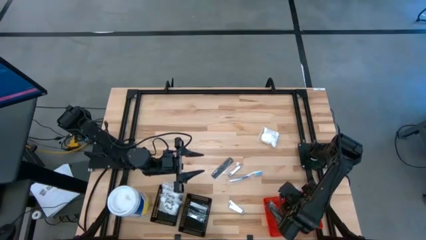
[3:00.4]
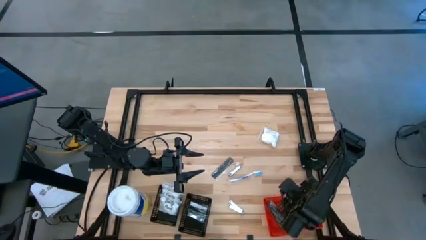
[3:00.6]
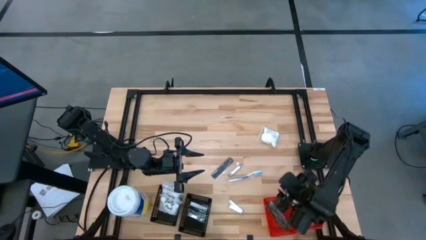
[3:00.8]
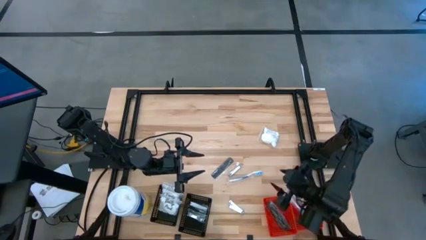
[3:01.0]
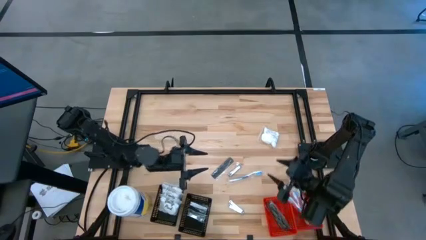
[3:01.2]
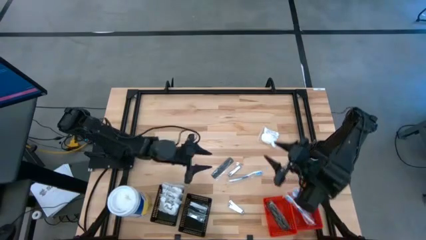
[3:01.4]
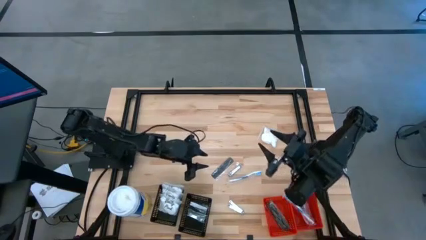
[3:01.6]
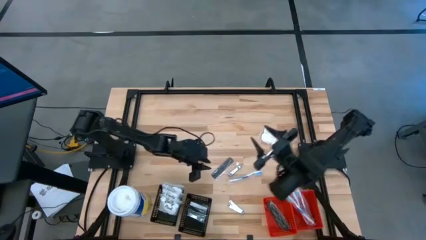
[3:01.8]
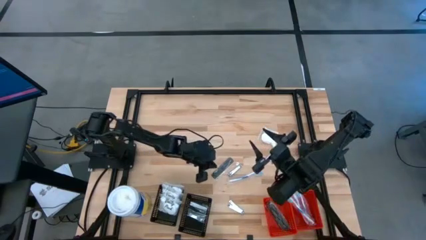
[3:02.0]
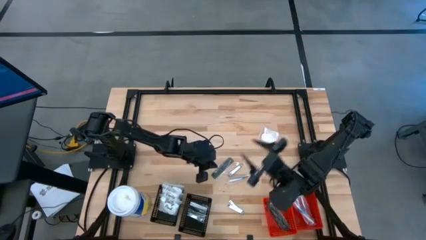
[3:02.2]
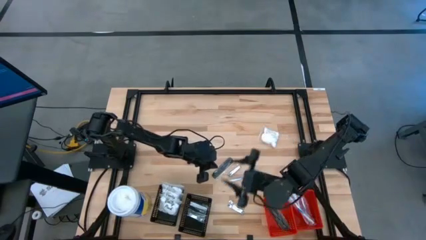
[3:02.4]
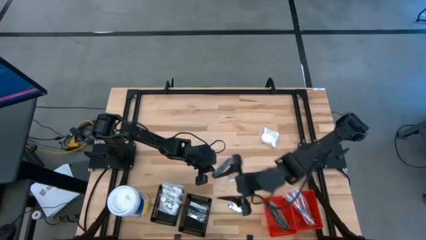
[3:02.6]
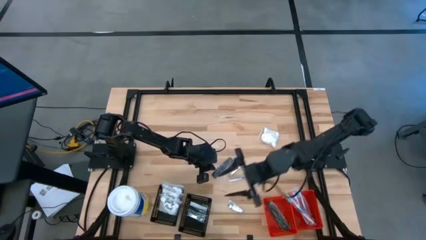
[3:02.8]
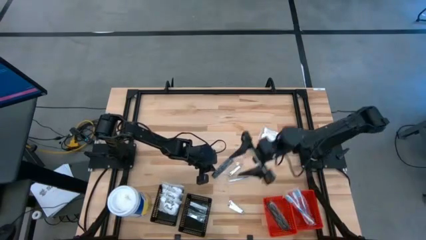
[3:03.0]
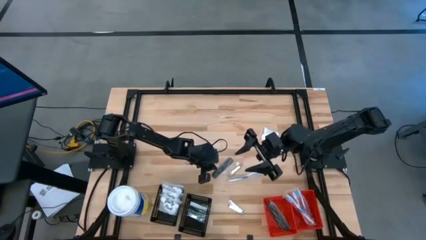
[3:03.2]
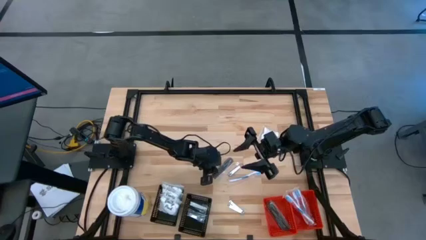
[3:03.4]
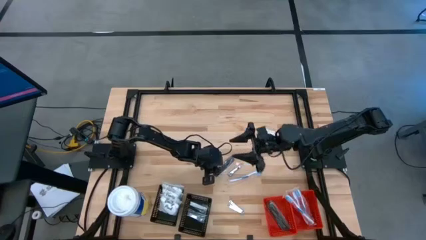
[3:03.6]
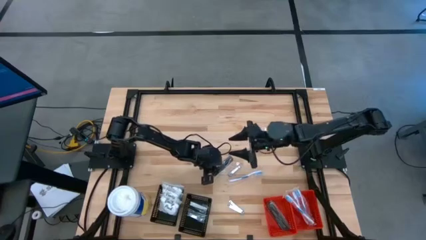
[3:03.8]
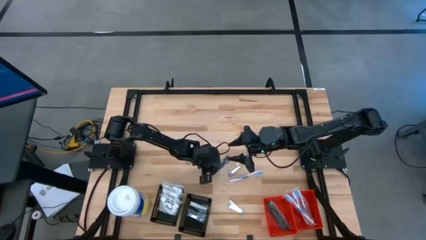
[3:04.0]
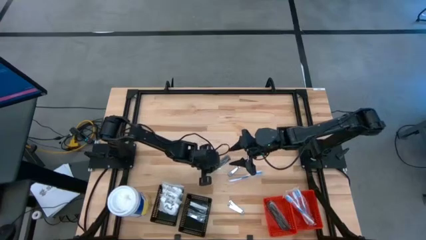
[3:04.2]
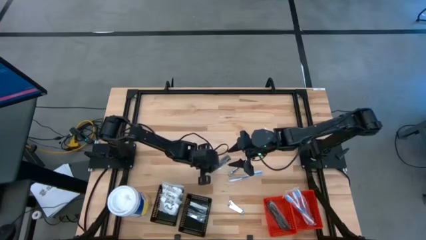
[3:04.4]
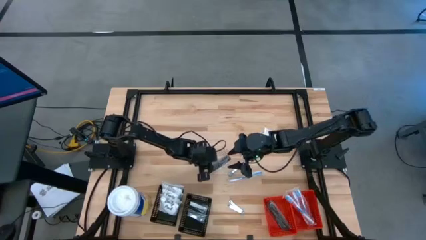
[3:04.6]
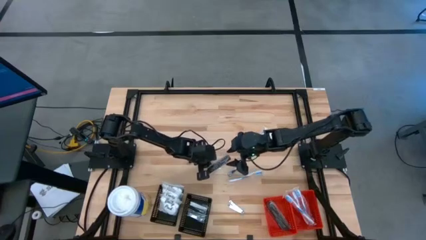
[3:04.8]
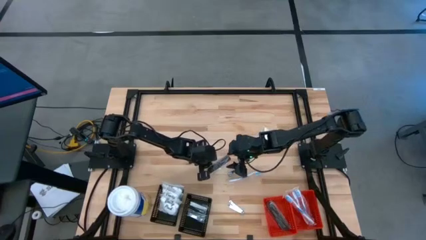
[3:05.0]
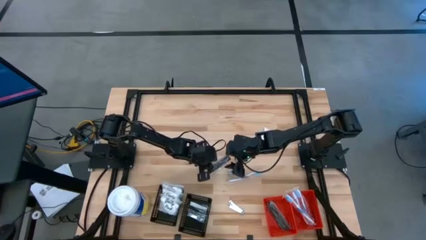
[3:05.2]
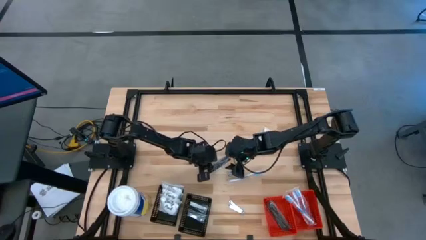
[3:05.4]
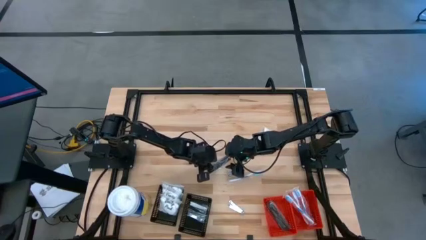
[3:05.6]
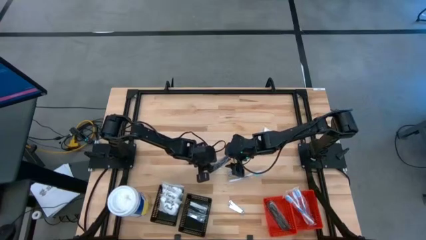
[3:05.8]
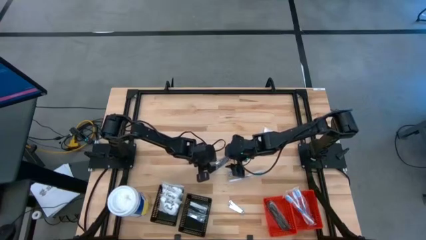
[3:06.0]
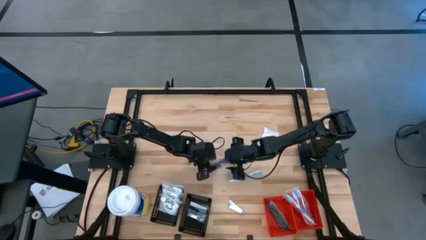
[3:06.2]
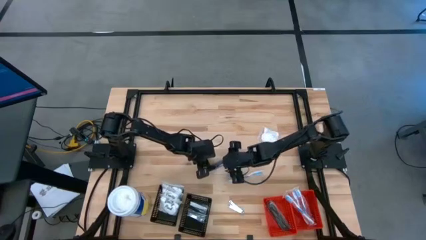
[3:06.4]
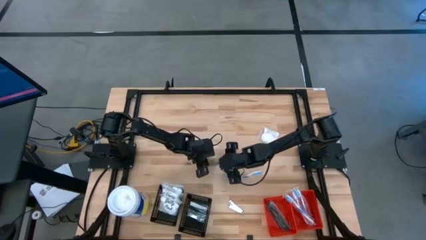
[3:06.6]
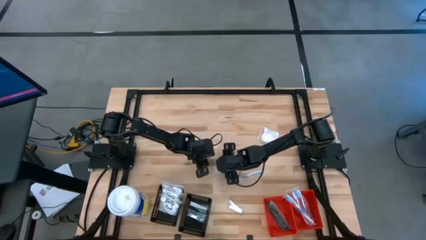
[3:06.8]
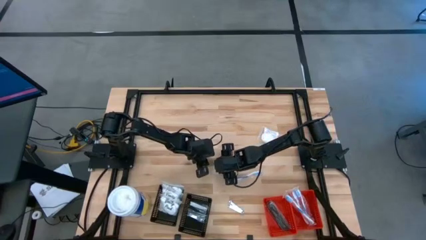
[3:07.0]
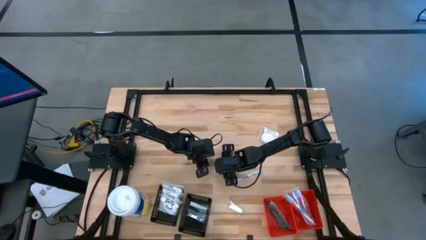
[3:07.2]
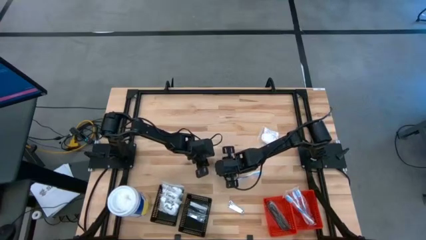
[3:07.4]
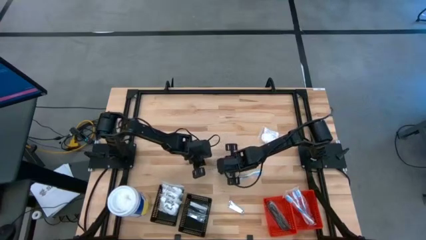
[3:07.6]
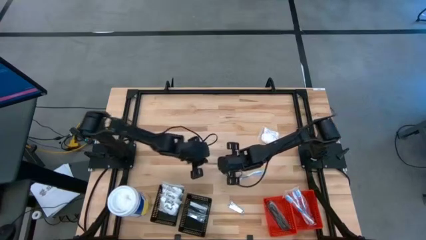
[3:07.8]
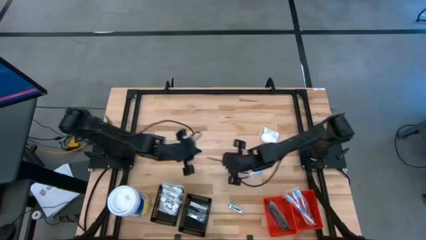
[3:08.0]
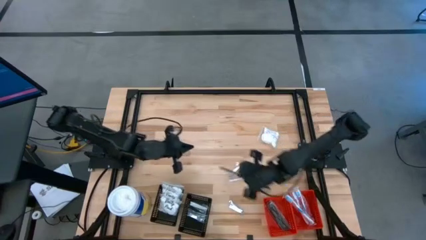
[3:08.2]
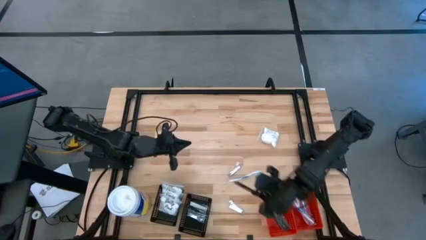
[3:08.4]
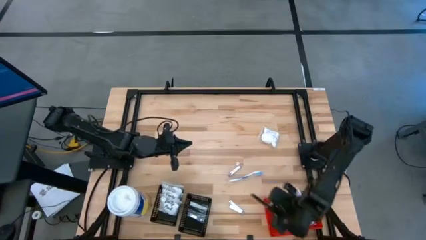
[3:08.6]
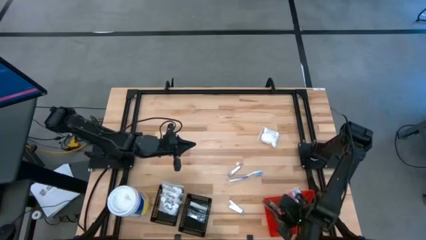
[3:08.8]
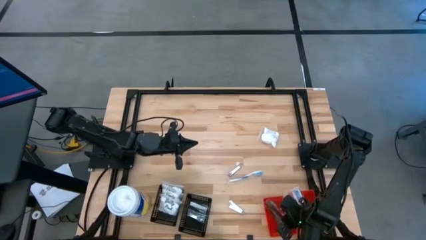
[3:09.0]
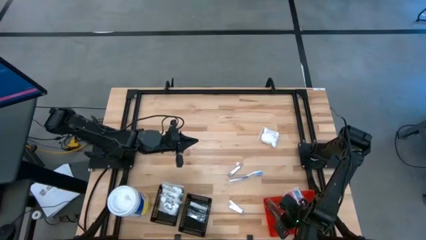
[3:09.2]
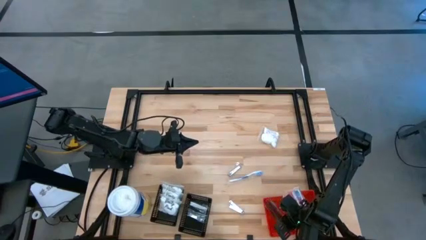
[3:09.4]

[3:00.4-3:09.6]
Task: Pick & Place Travel size toiletries
Put the black hair comb into the left red bin

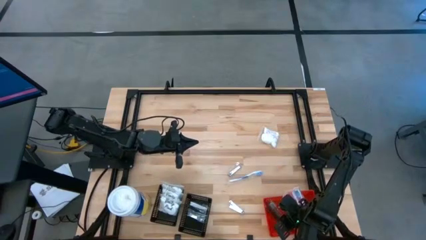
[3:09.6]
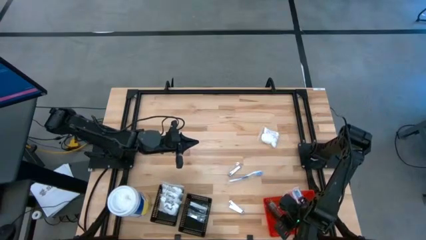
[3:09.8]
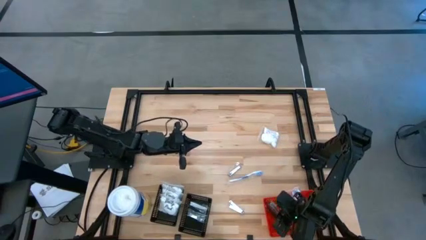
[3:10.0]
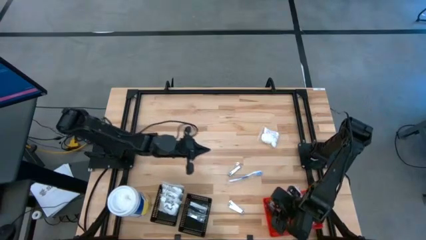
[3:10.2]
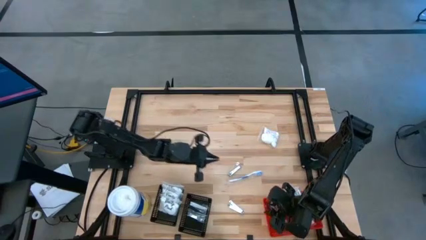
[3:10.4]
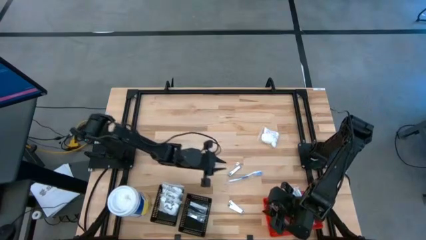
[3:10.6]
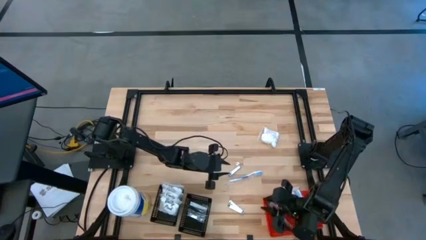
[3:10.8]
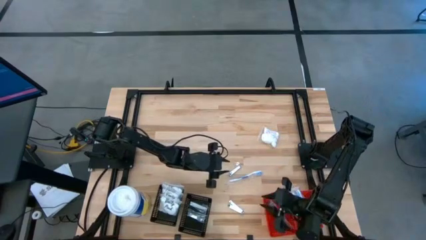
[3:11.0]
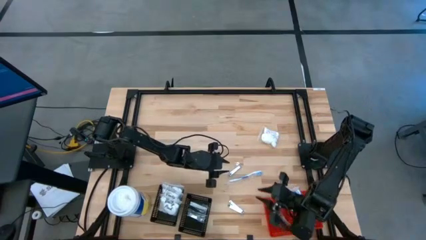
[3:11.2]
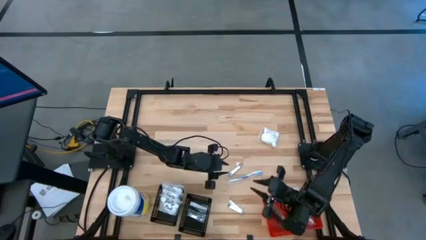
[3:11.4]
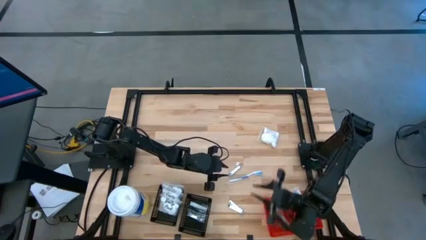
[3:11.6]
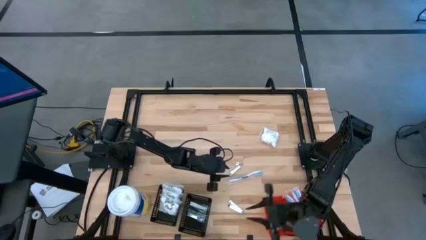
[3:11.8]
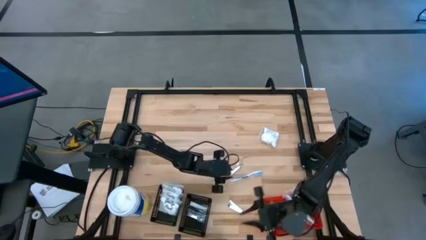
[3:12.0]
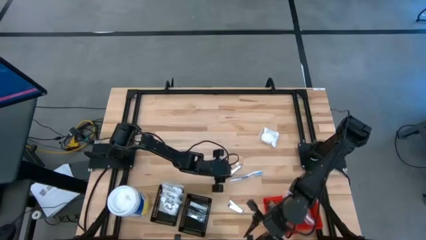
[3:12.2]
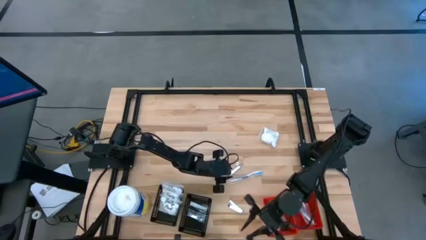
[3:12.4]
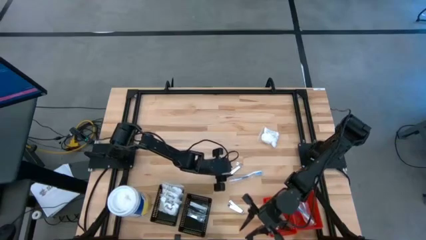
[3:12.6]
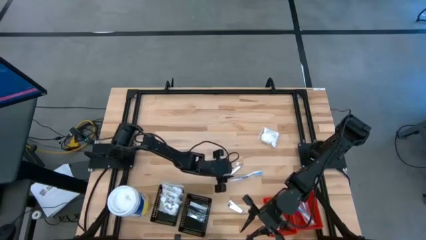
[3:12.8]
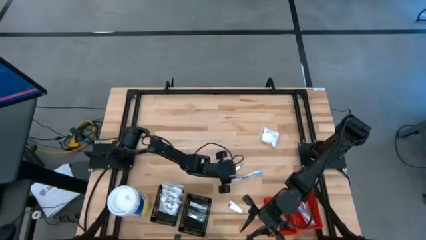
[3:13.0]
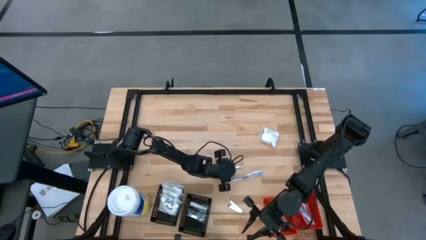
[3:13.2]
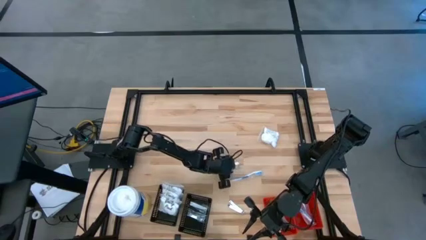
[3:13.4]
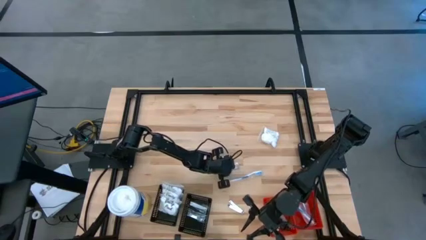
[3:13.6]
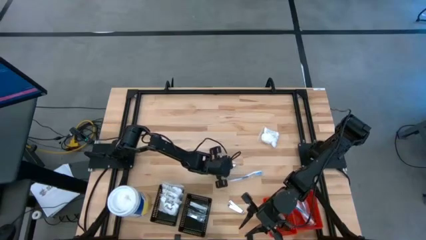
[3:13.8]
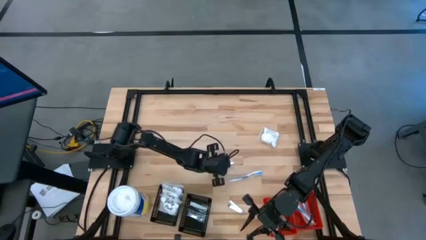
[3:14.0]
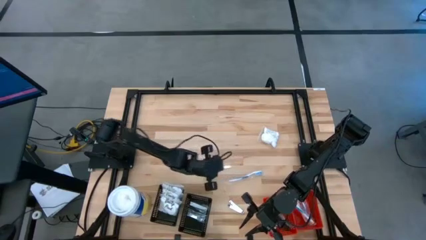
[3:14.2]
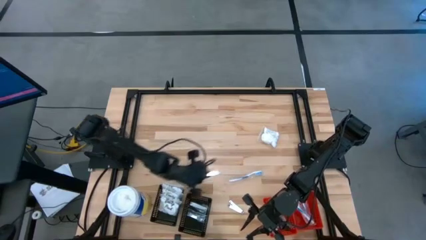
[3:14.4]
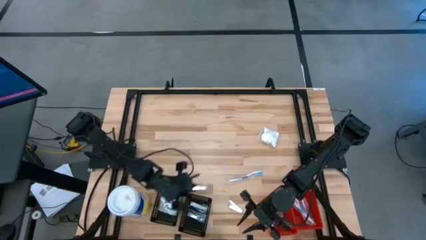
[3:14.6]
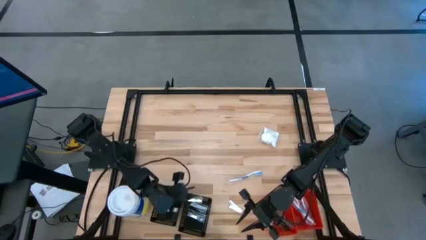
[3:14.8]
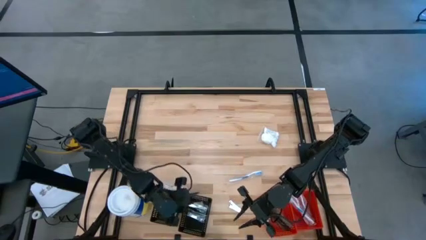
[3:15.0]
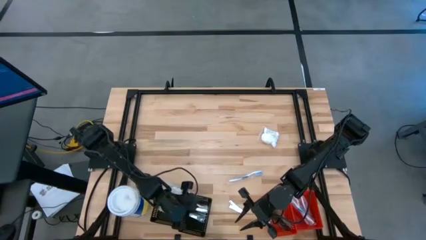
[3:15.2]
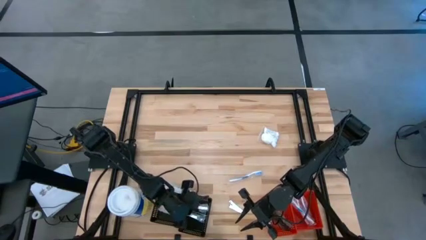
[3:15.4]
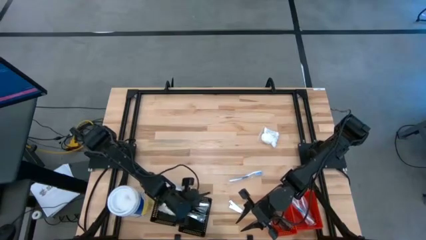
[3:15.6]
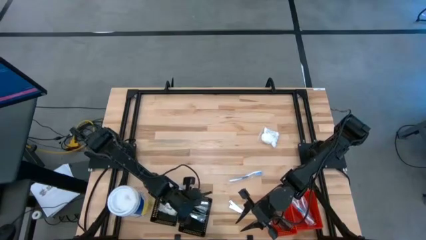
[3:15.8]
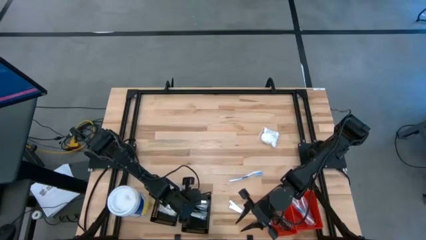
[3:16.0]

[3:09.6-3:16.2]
Put the nail cutter into the right black bin
